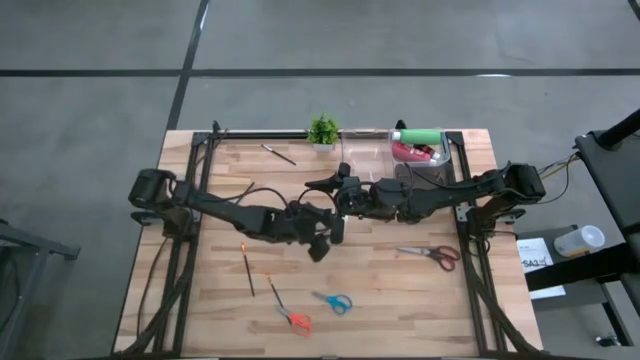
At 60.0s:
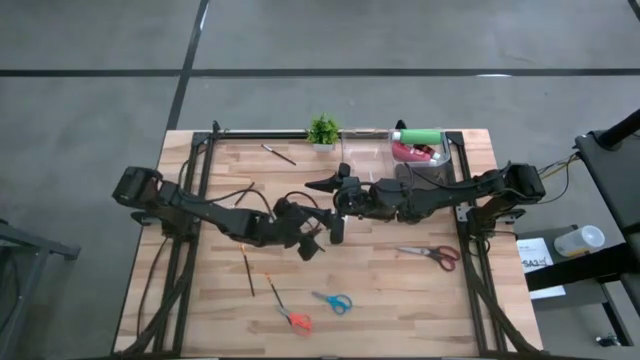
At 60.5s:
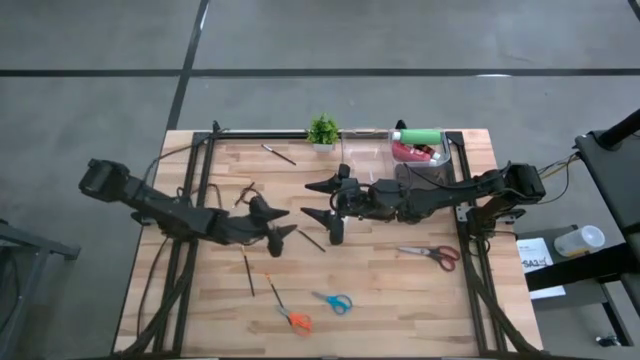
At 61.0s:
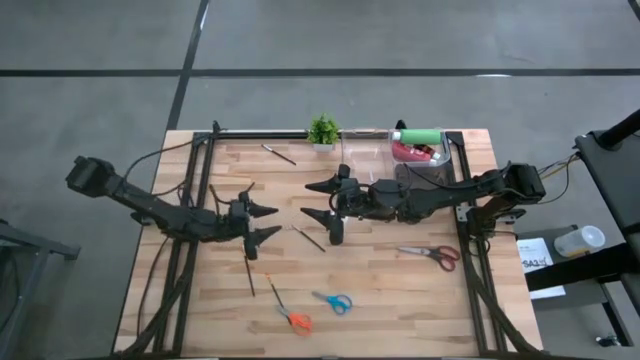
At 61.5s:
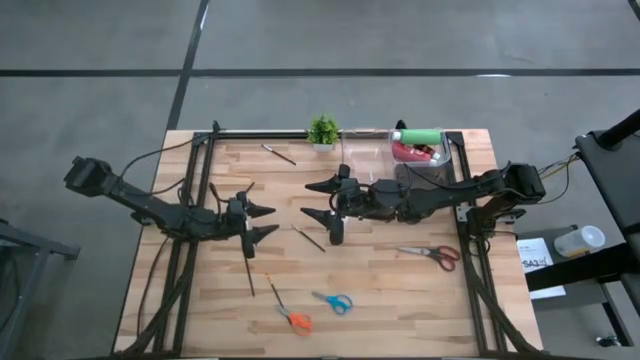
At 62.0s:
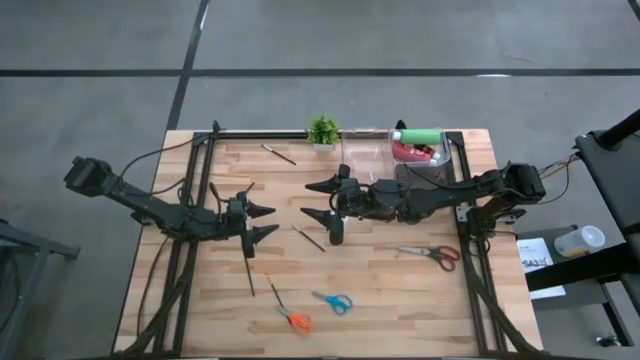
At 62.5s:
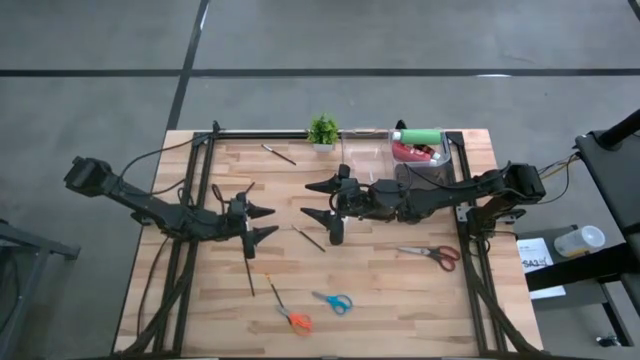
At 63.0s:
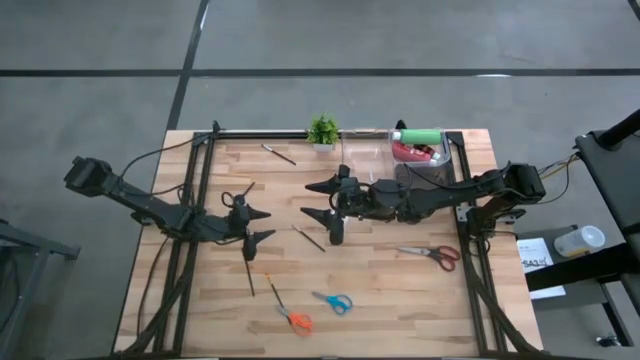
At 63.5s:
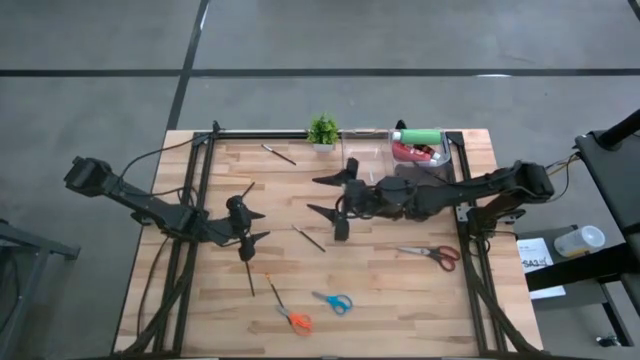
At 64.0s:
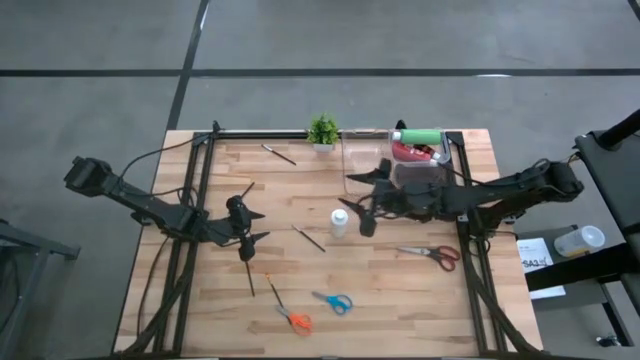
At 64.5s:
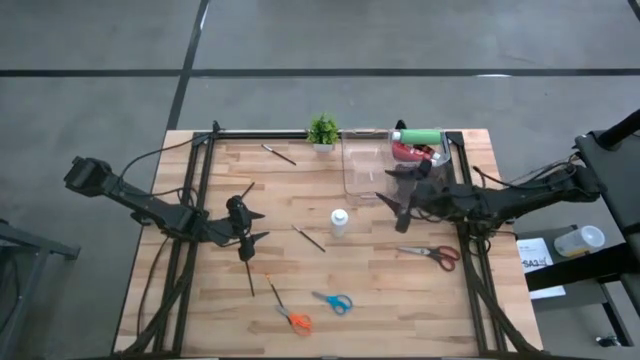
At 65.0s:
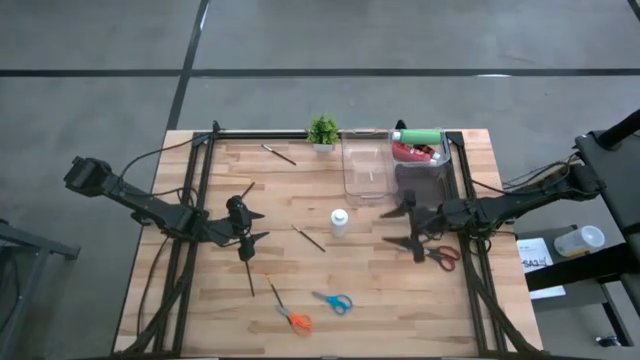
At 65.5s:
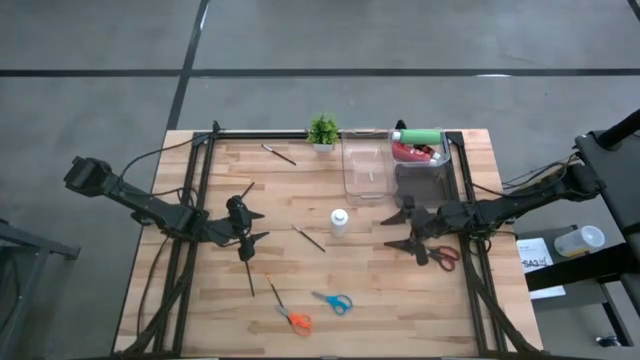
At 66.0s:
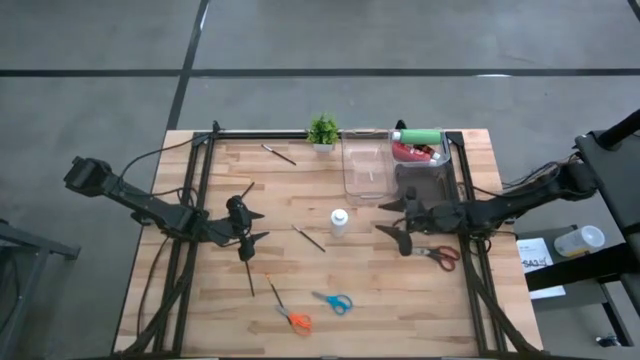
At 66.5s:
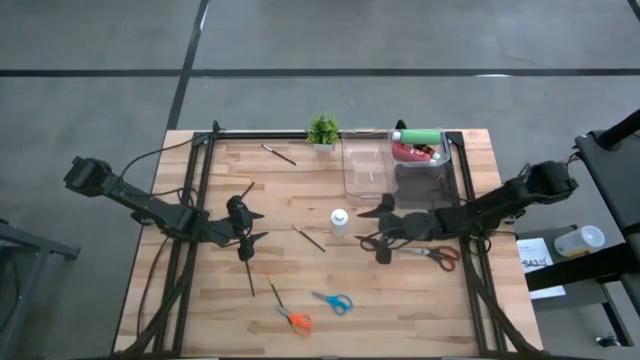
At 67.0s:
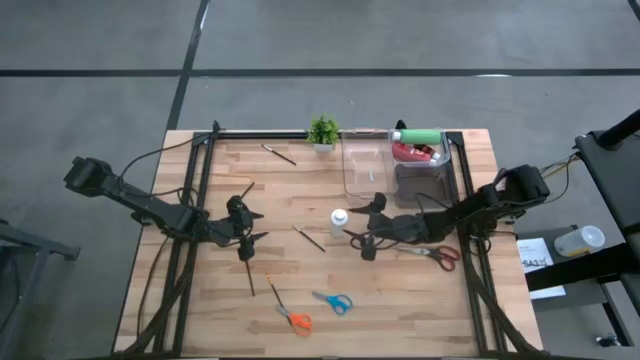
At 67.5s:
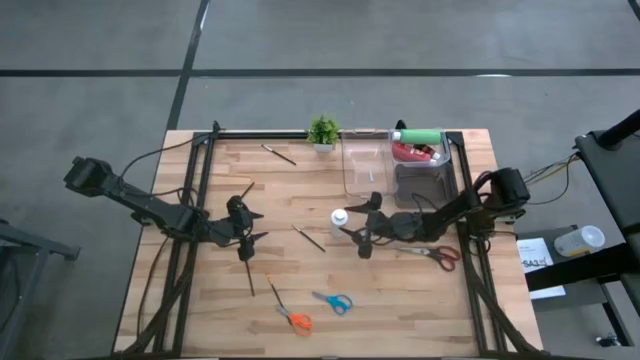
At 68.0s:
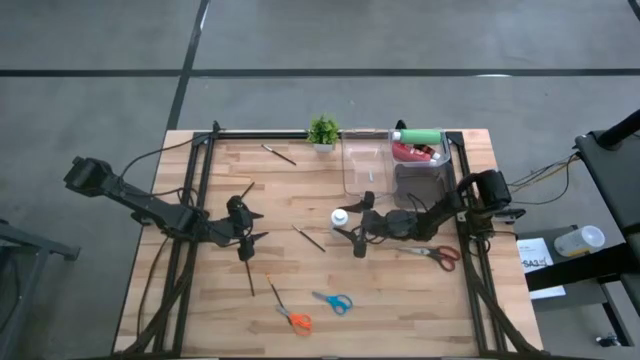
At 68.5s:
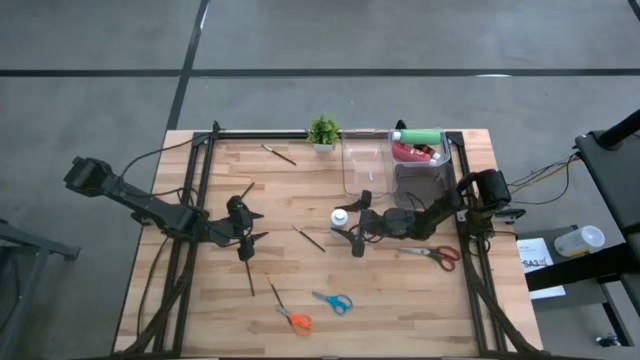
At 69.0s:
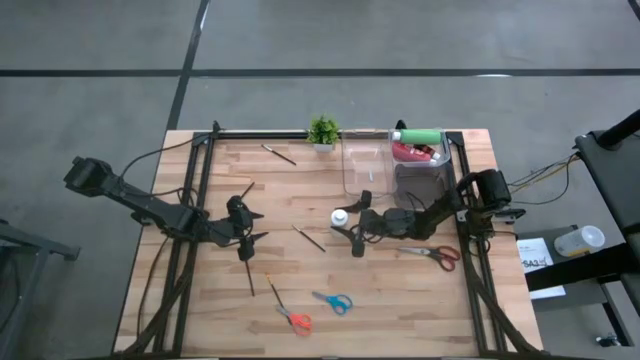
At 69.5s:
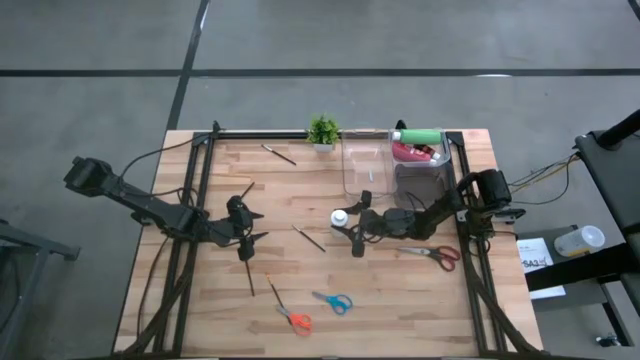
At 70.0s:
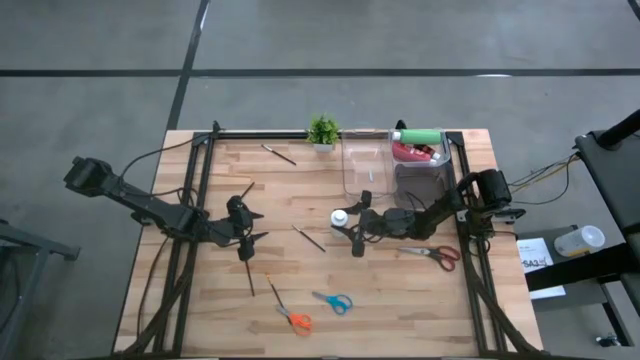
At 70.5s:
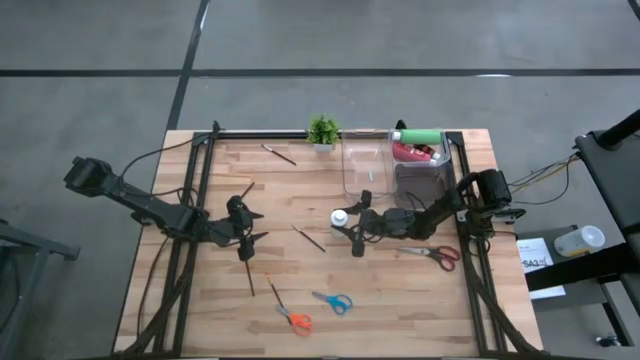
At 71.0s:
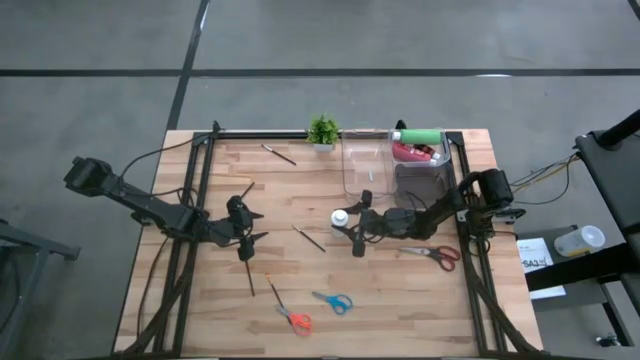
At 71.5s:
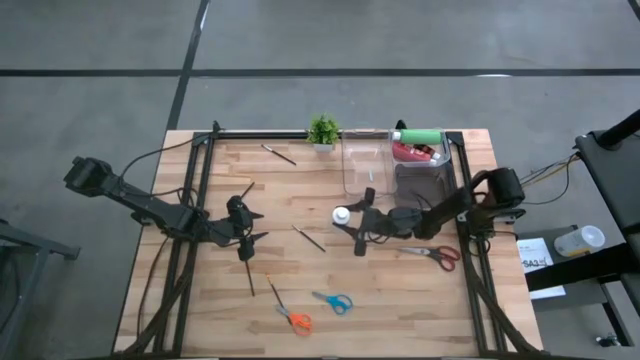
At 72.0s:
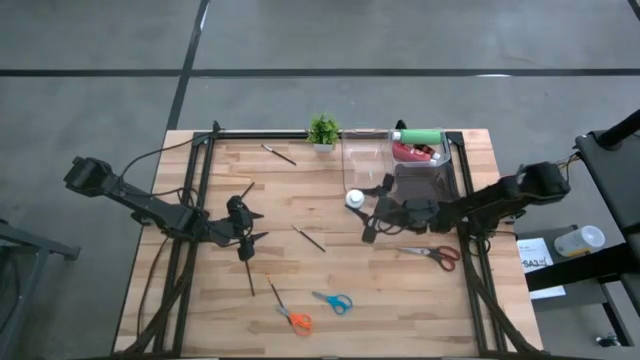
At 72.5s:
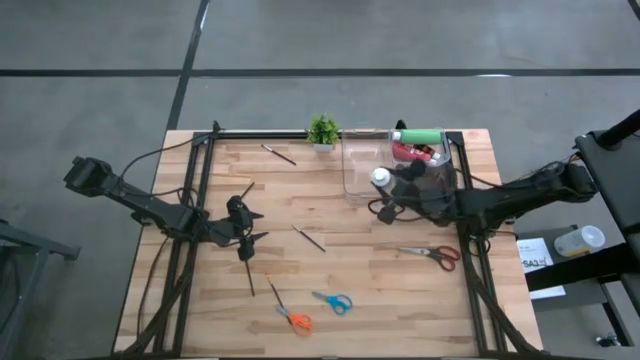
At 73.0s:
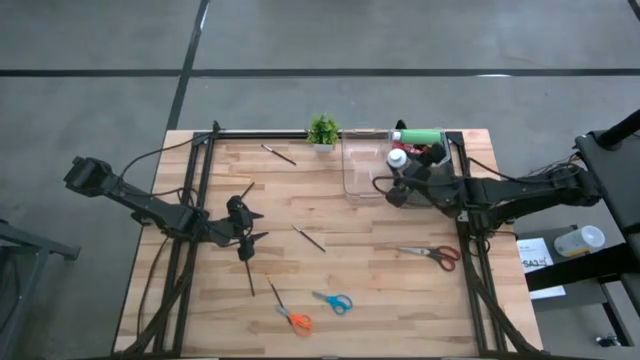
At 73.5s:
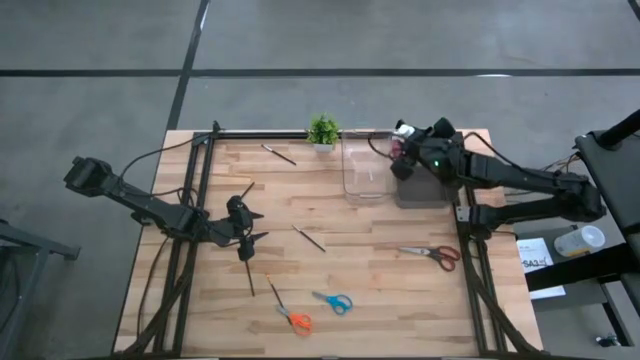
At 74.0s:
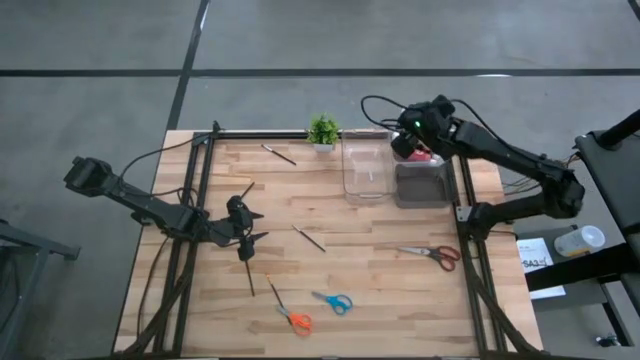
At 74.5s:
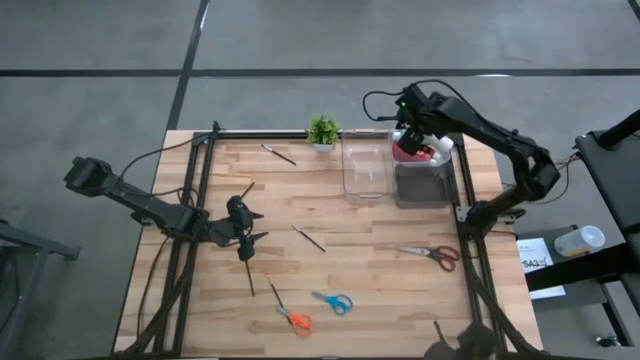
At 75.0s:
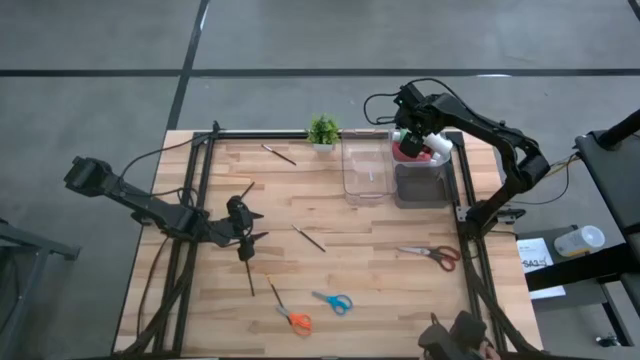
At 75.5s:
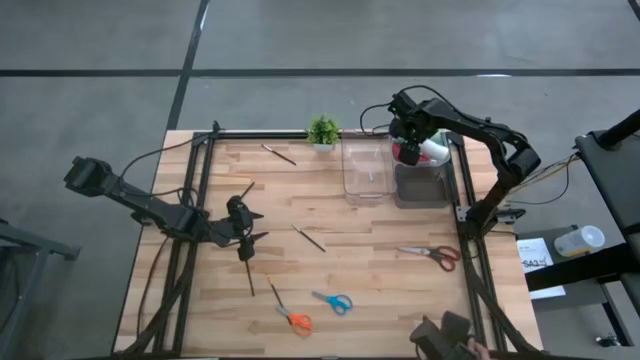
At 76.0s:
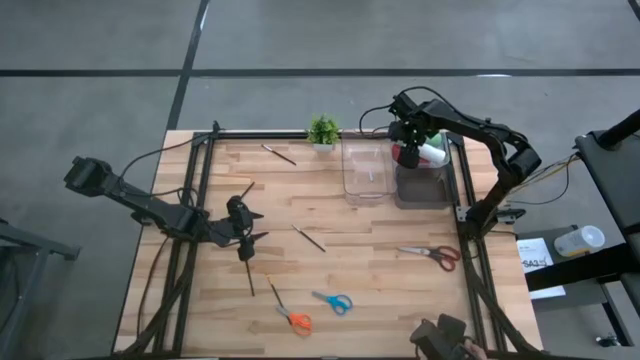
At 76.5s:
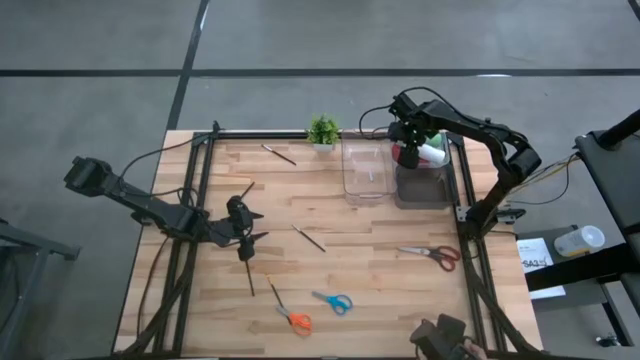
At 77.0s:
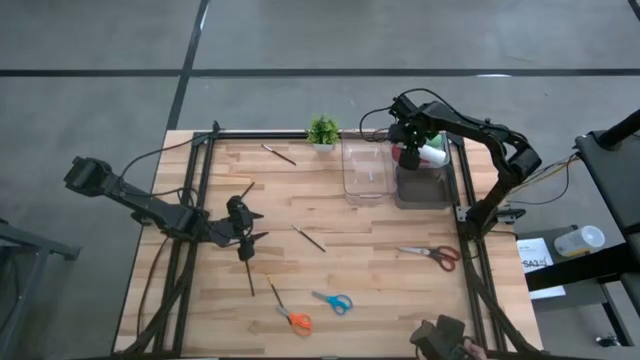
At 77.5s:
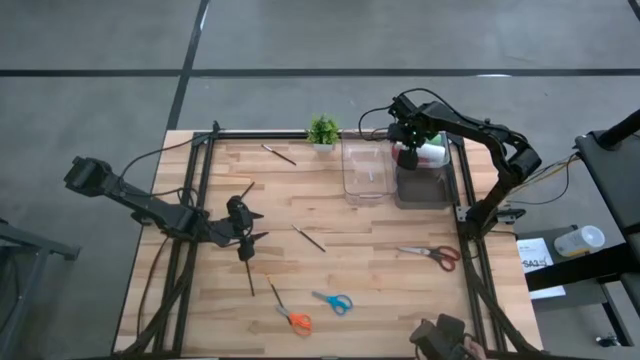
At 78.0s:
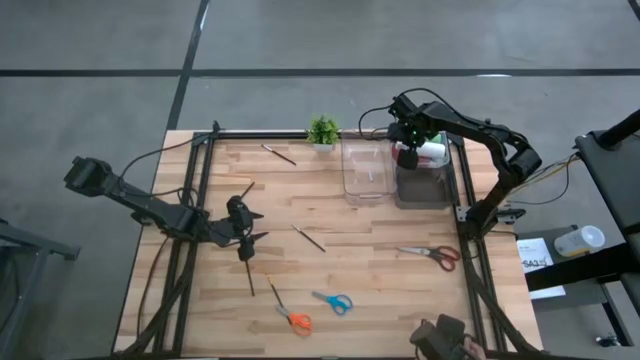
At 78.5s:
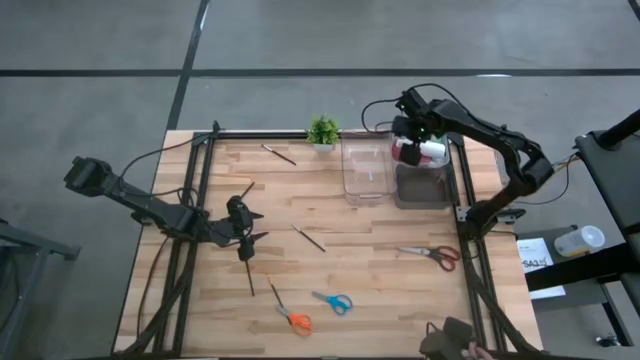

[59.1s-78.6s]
Task: Pick & Place Paint Supplies
Put the white paint bottle into the right transparent bin
